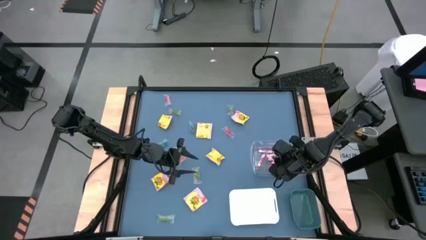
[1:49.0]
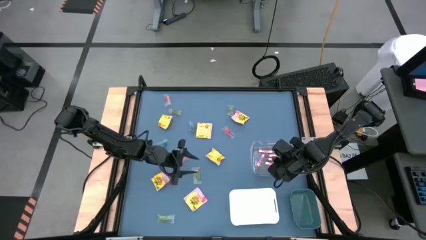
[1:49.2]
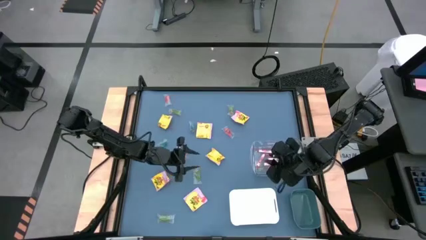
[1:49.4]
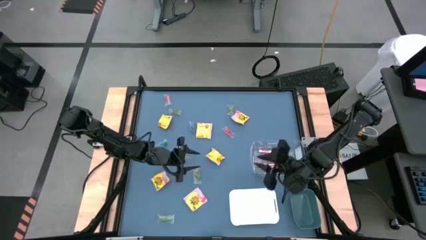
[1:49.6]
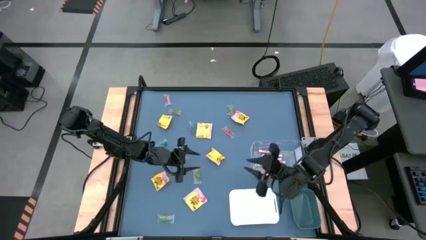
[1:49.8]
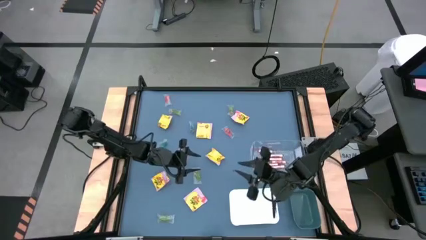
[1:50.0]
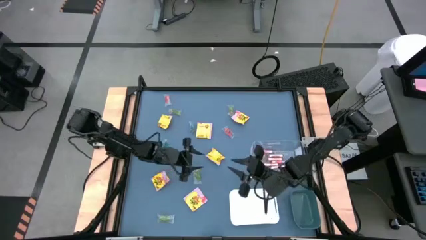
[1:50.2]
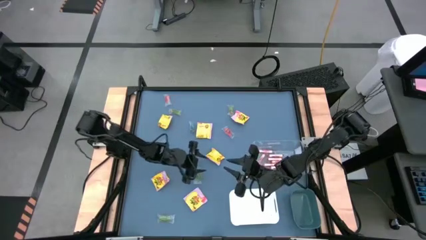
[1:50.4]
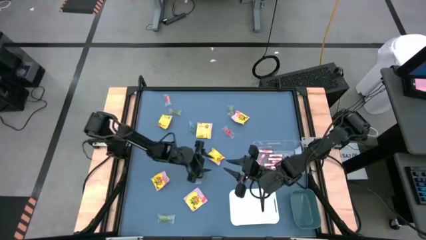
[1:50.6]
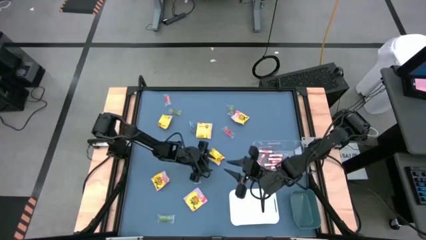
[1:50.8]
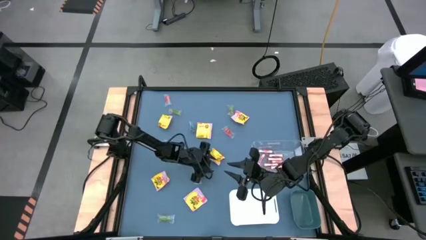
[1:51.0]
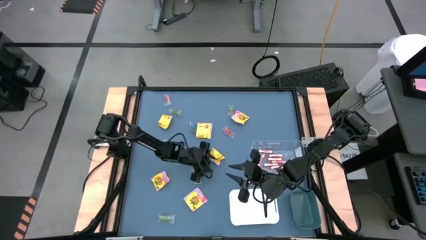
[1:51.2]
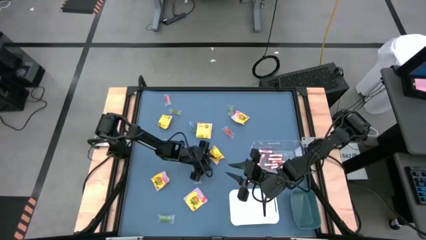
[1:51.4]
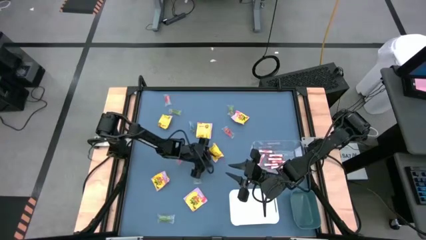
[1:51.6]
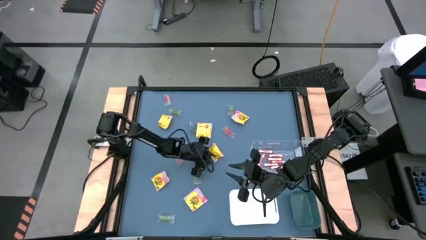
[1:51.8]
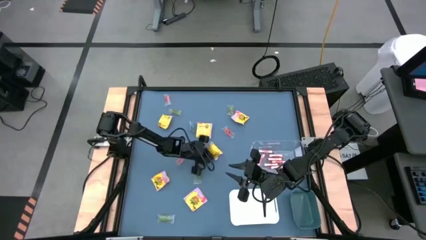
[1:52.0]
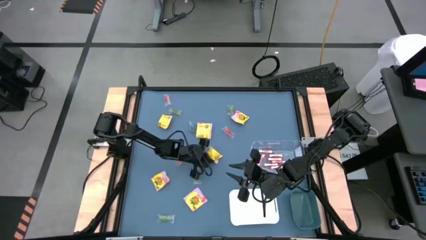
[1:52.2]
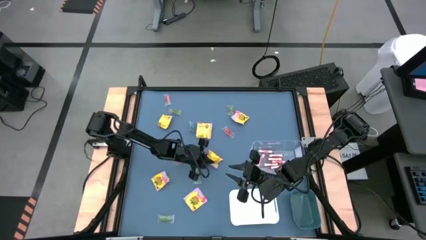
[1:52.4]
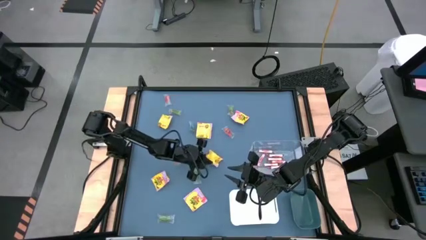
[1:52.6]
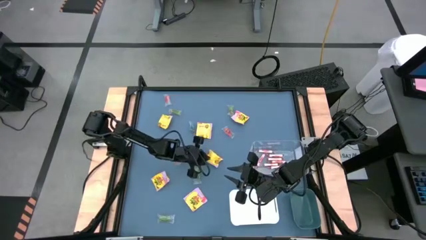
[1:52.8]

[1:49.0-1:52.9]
Task: Sort candy
Put the yellow candy into the white bin

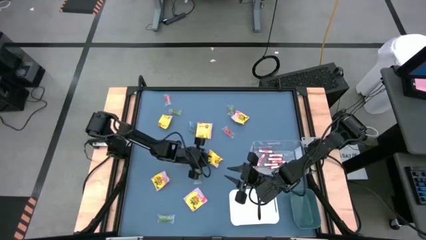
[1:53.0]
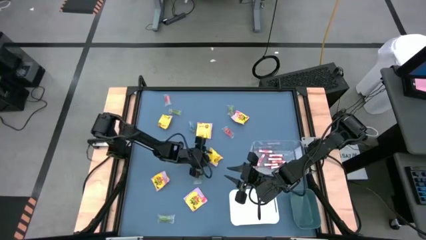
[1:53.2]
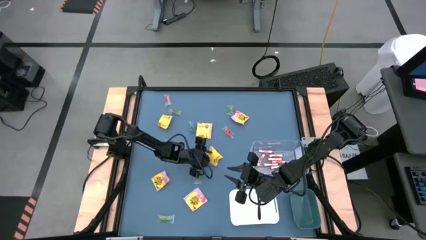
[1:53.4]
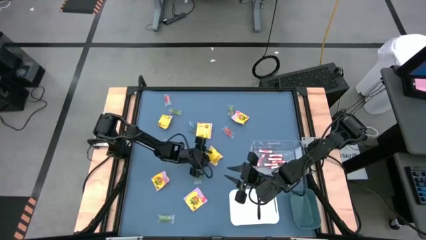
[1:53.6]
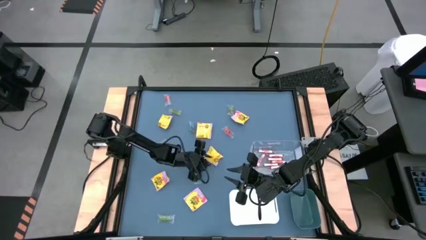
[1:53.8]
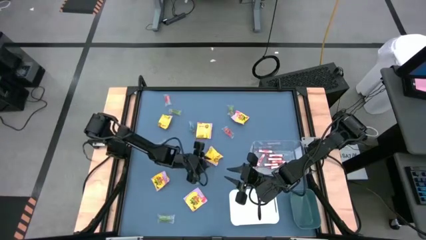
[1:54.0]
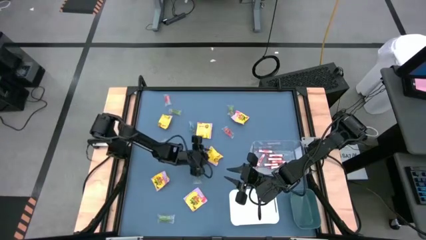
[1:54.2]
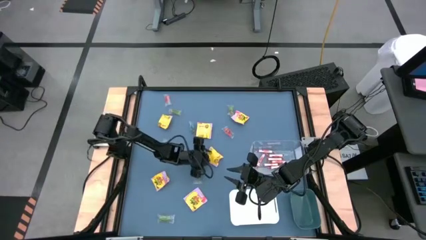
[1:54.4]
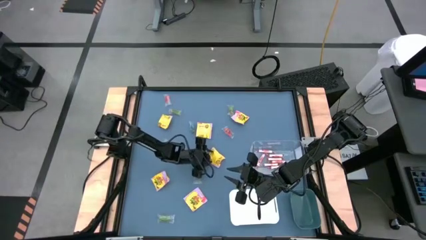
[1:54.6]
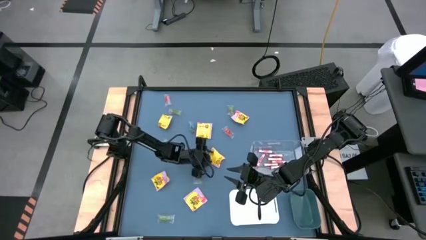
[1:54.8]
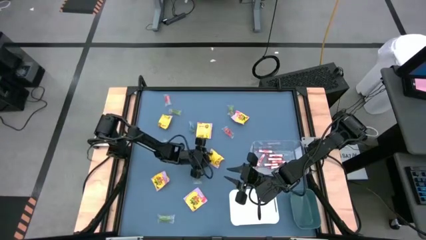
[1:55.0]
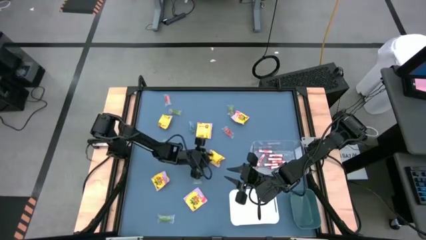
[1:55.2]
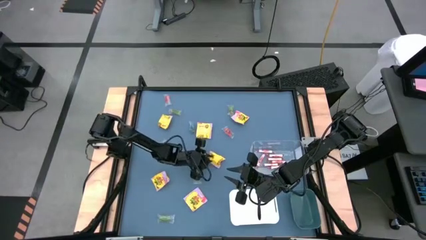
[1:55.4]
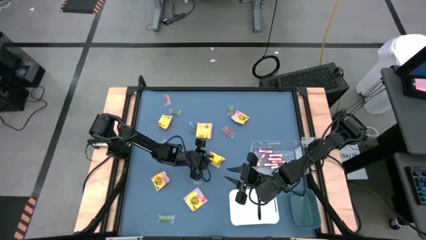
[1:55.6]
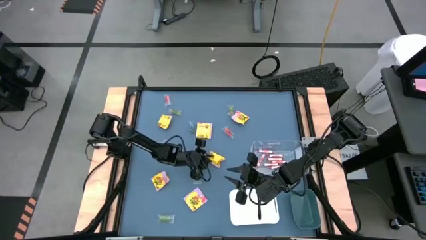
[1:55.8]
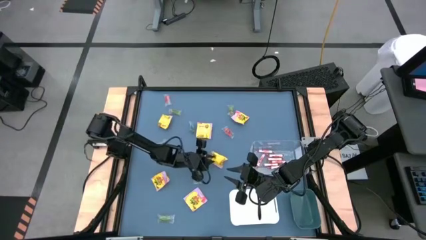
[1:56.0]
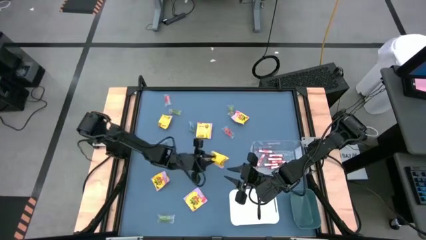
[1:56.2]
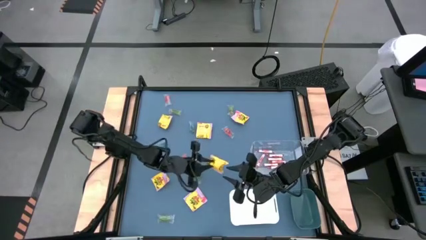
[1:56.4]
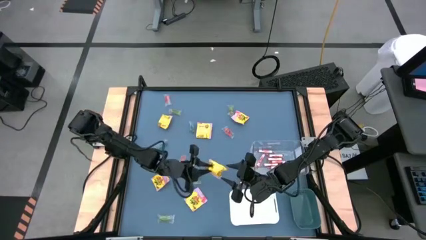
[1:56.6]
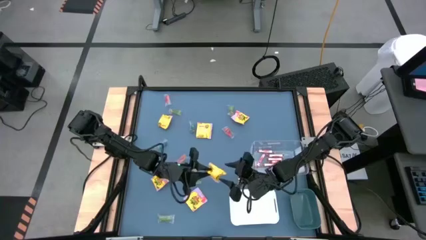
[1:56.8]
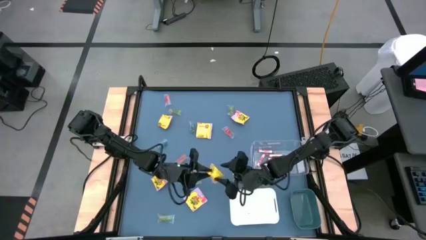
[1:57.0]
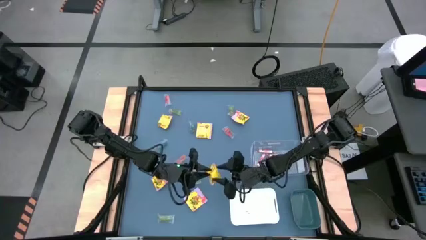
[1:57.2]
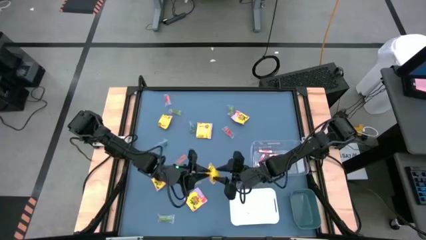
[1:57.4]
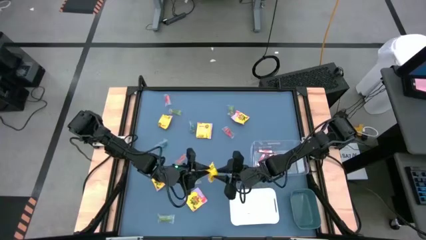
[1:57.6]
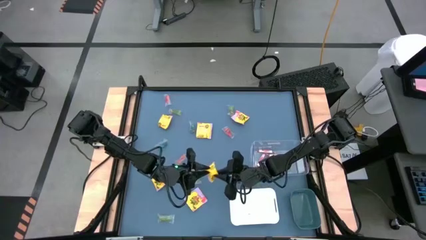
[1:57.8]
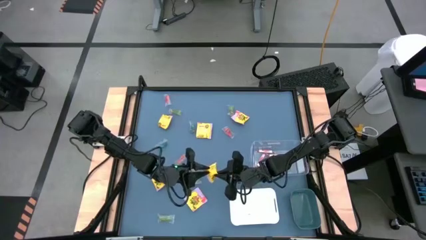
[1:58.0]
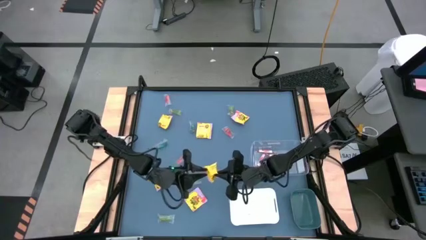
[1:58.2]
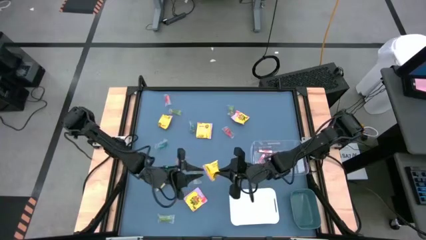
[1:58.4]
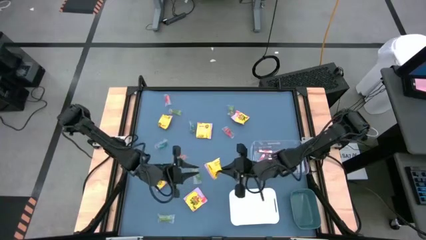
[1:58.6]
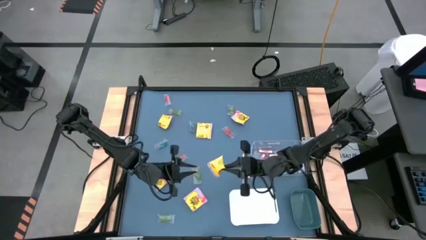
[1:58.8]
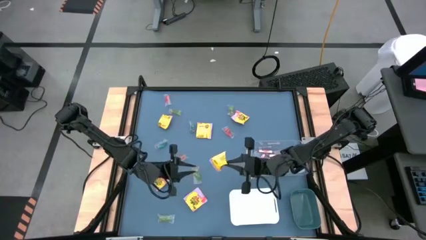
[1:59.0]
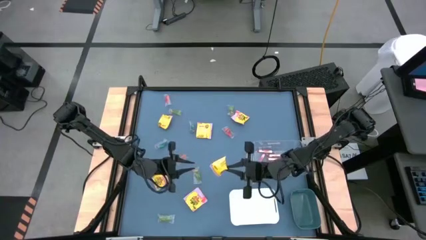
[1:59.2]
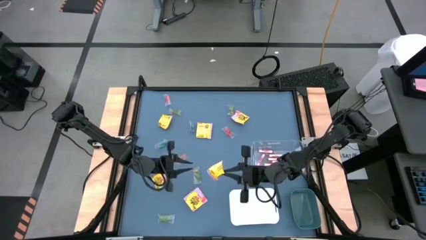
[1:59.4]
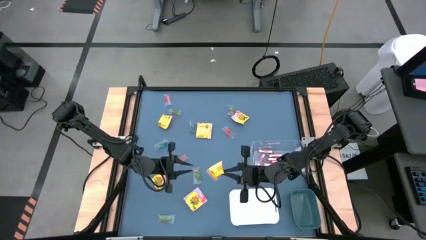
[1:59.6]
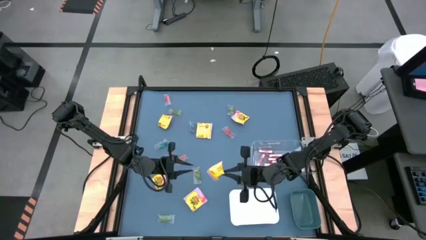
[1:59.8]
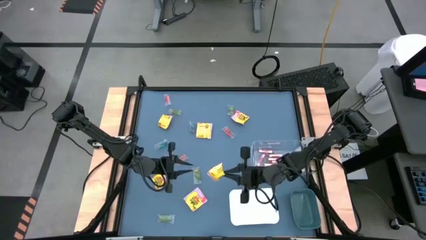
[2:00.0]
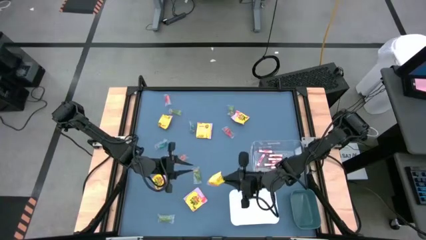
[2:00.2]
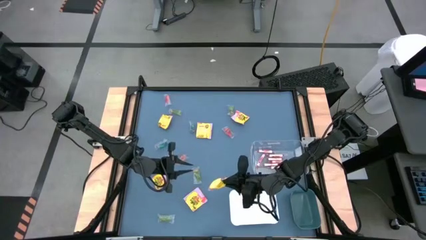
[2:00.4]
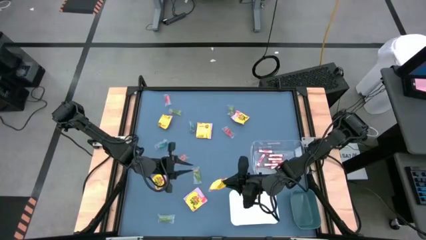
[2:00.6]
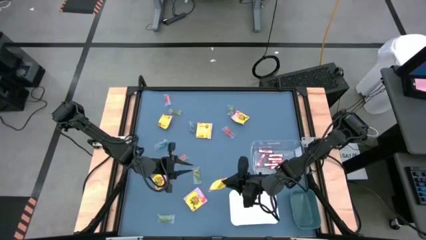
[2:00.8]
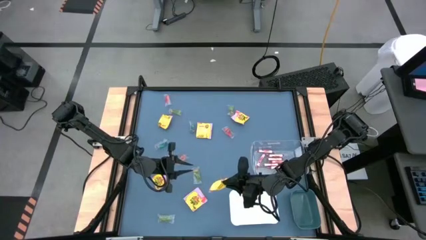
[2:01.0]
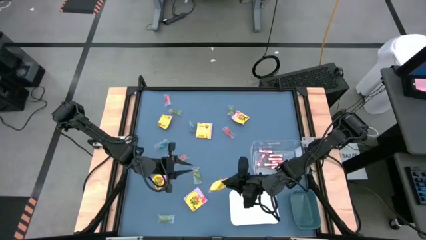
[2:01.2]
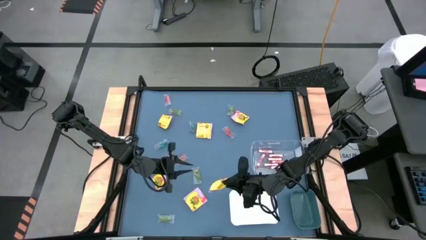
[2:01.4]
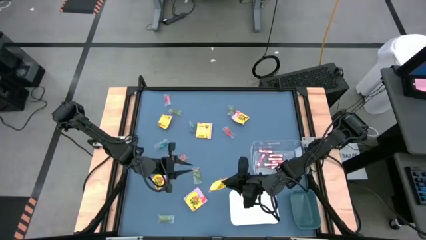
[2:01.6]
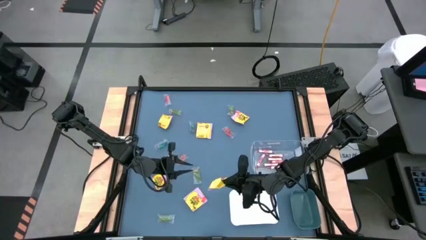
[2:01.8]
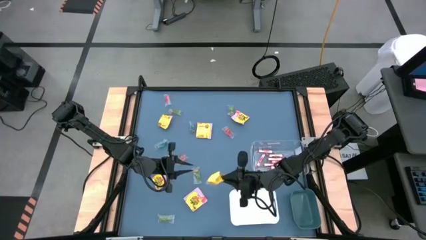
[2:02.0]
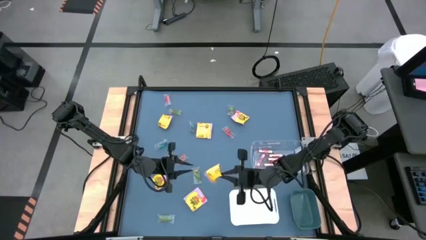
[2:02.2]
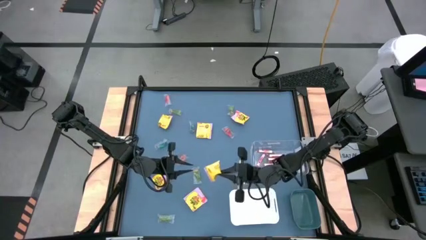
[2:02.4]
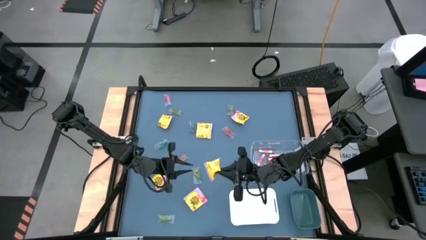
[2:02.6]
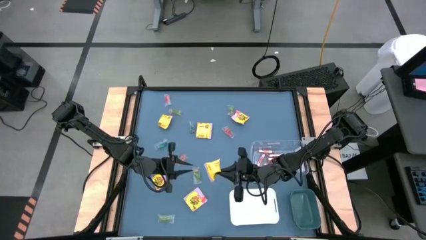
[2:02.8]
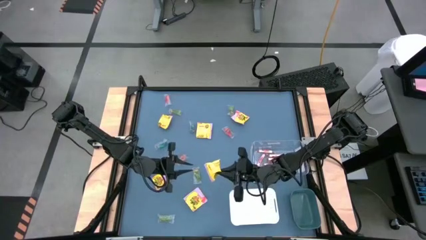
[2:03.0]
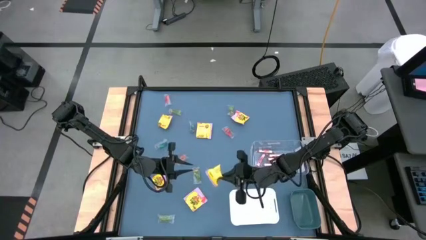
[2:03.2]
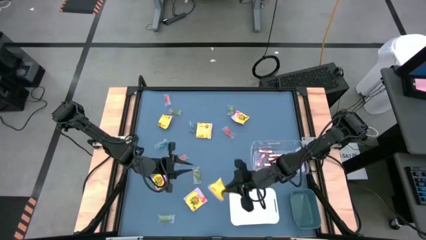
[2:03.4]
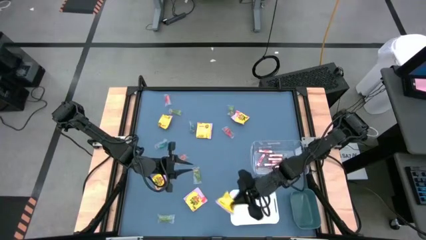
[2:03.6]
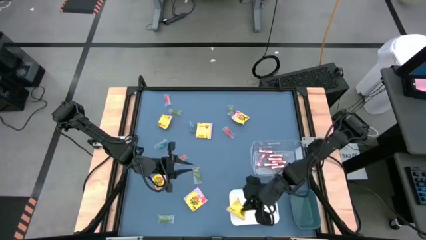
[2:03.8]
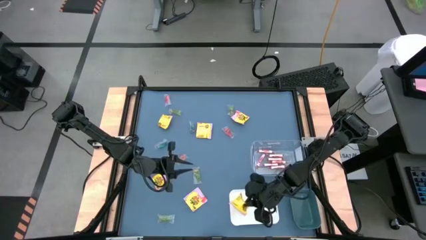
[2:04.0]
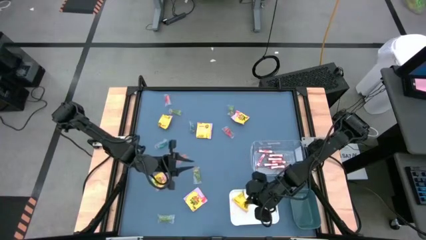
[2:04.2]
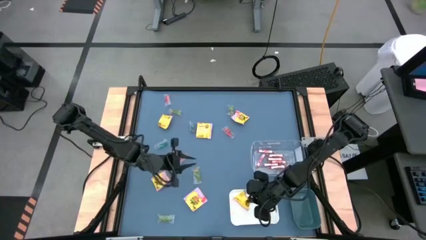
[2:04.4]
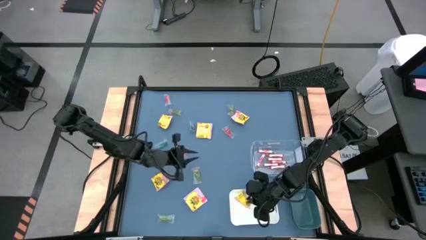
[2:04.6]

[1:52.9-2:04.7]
Put the yellow candy into the white bin

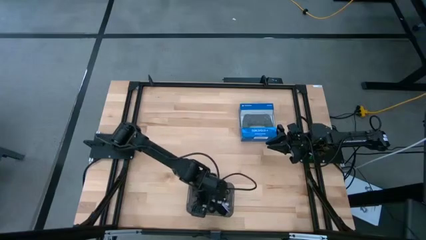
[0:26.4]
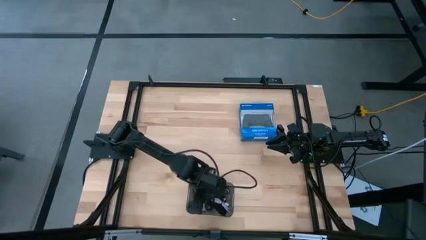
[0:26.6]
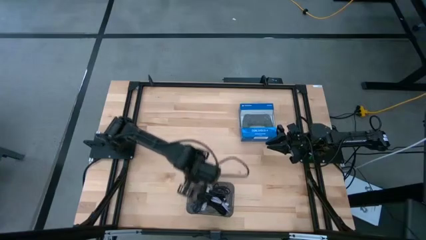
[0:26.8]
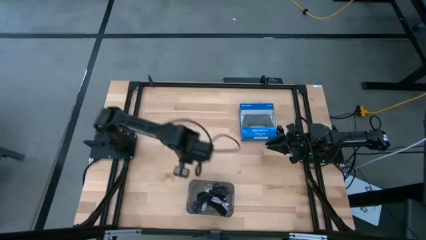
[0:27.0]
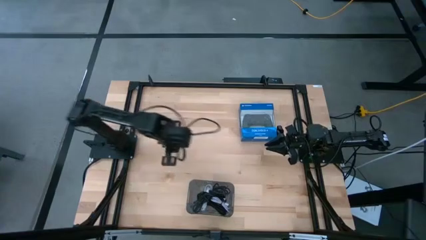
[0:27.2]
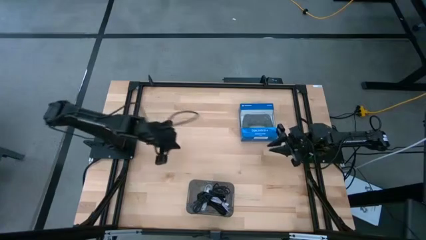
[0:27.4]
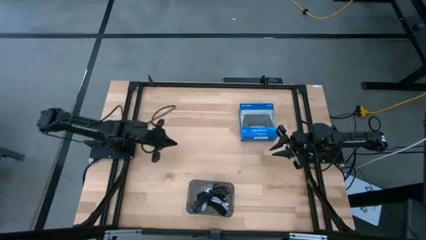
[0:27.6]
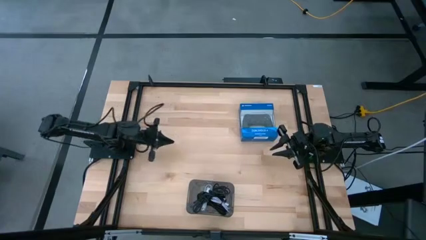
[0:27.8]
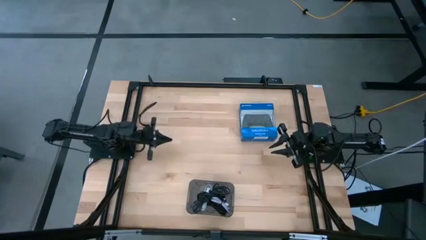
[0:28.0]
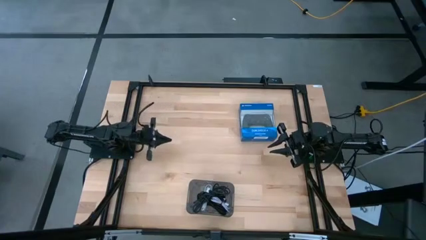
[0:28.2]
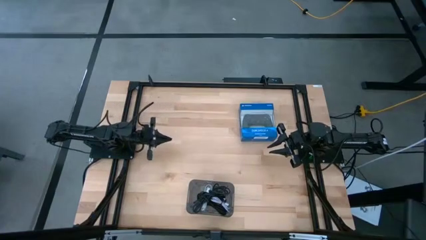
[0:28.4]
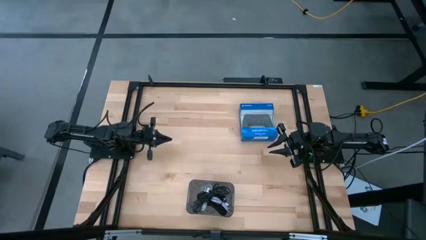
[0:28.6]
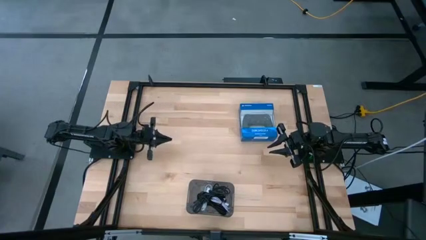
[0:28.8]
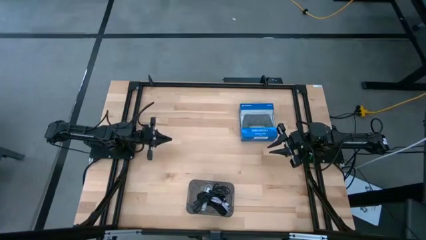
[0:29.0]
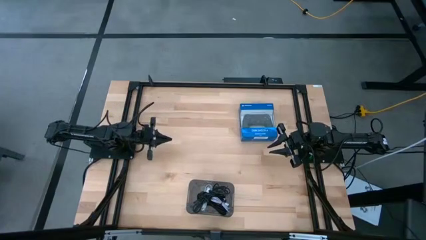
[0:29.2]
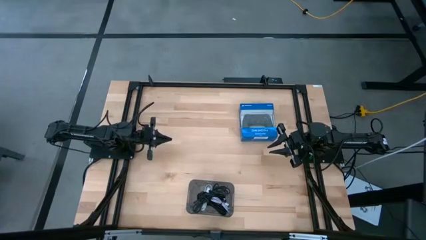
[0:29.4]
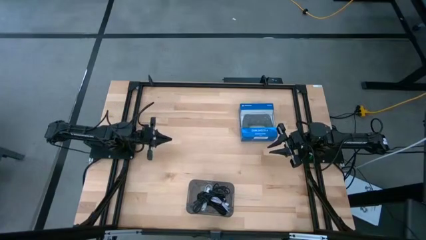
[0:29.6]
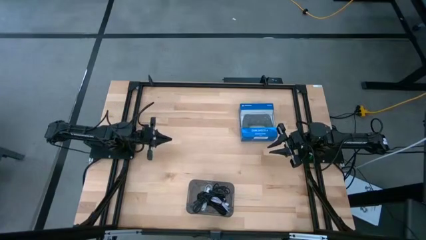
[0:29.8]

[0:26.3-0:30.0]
Task: Pick and place USB-C Cables
Return to Home Position
